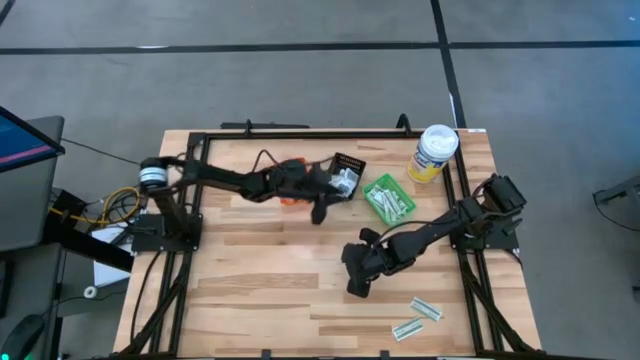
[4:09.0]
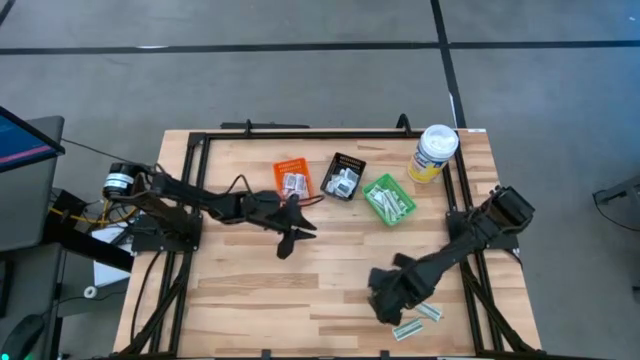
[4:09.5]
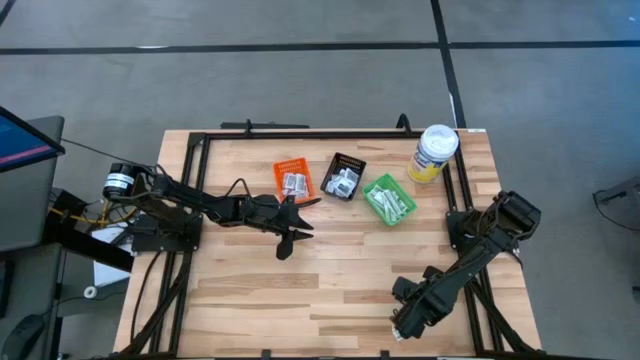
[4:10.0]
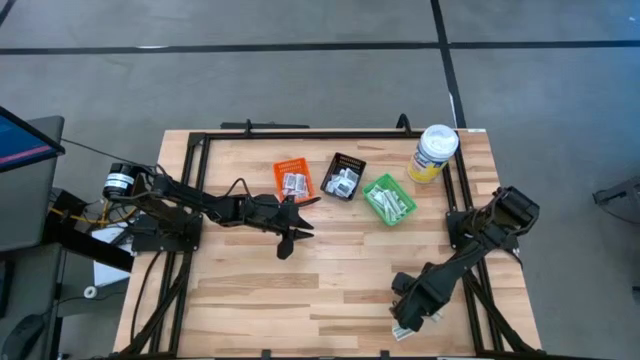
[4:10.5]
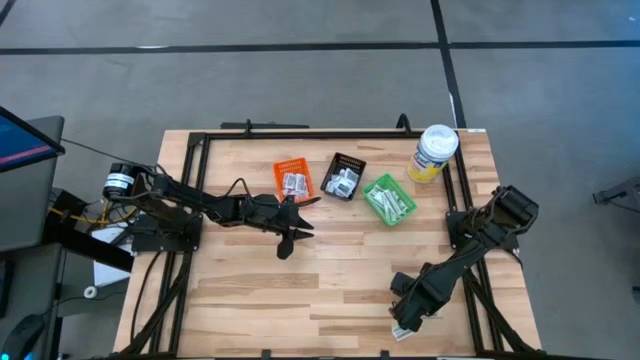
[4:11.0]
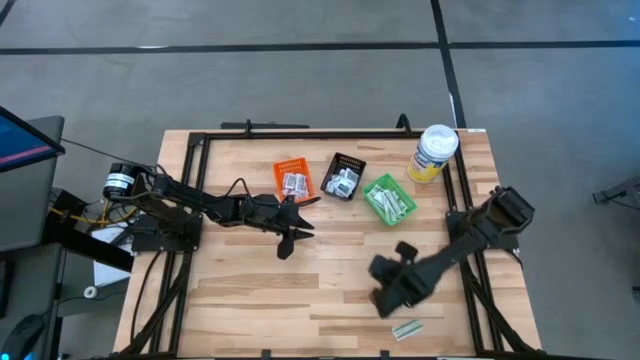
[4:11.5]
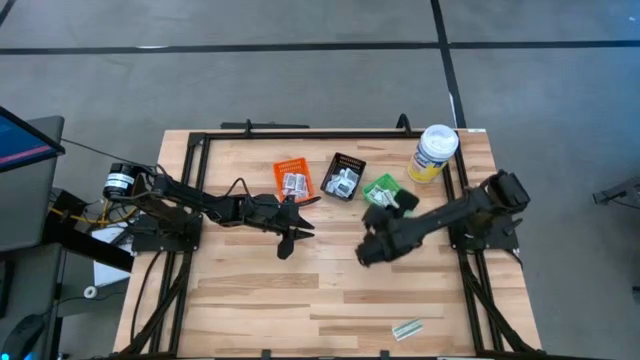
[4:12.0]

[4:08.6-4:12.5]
Task: Pick & Place First Aid Supplies
Put the green bandage pack into the green basket

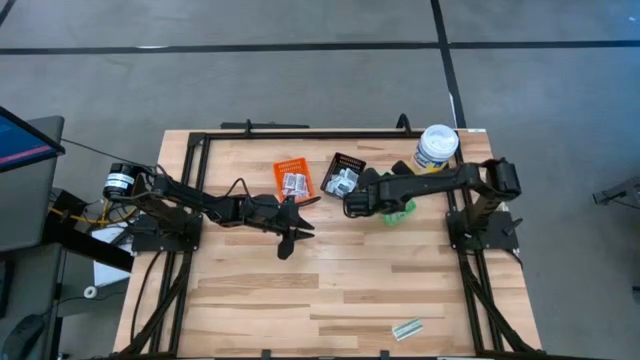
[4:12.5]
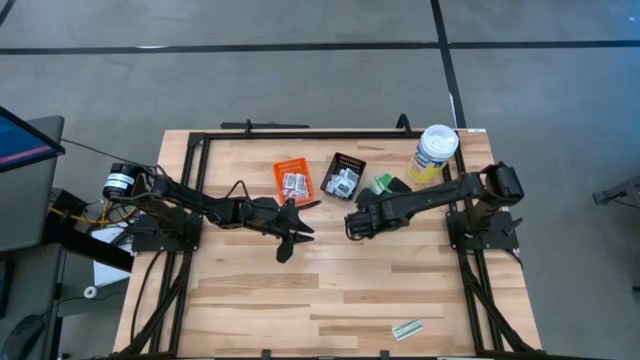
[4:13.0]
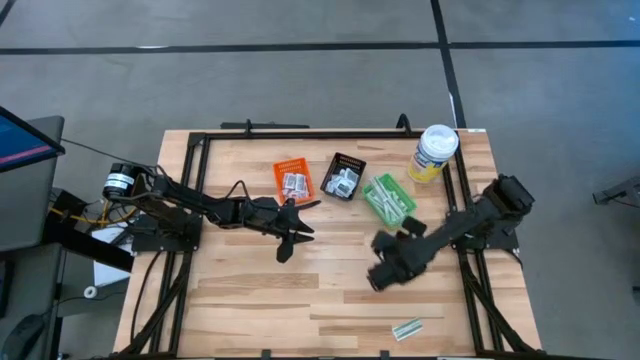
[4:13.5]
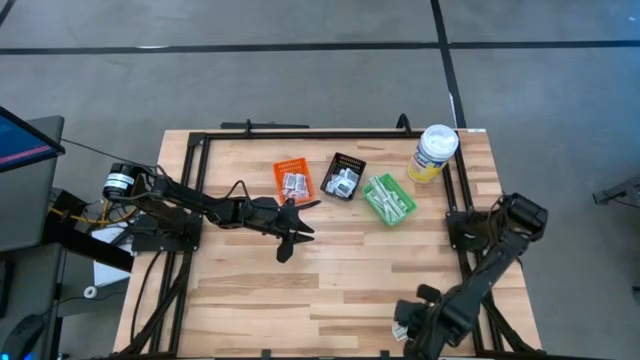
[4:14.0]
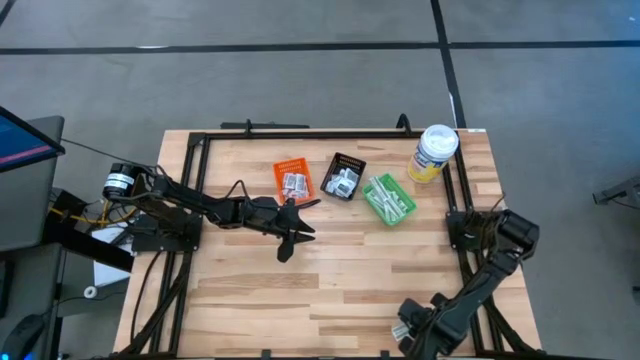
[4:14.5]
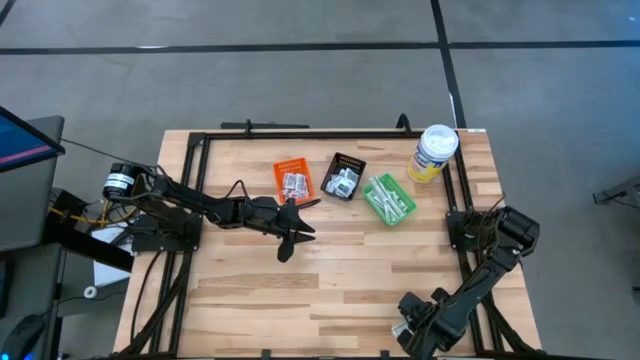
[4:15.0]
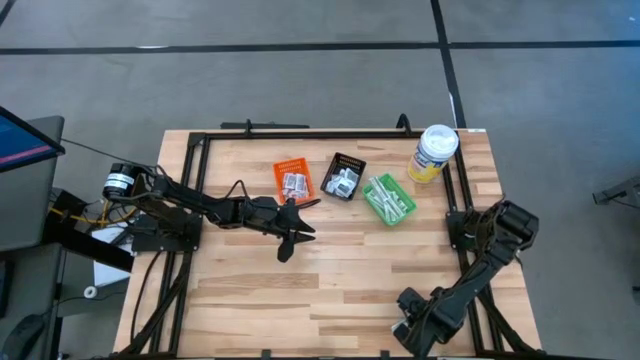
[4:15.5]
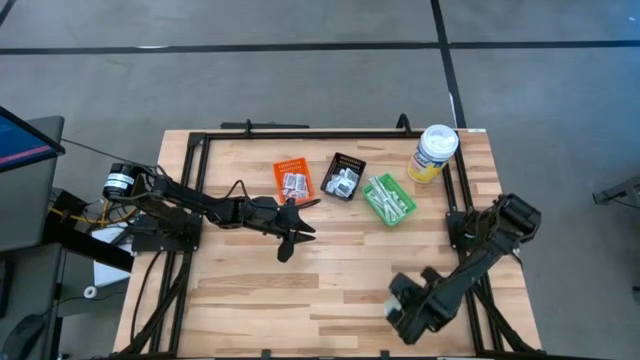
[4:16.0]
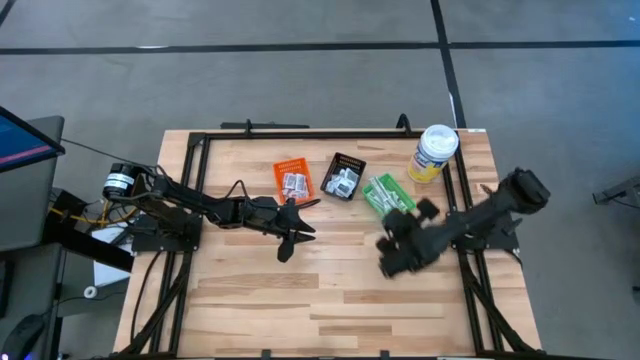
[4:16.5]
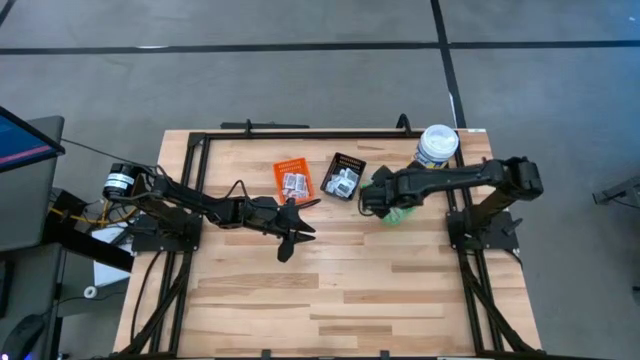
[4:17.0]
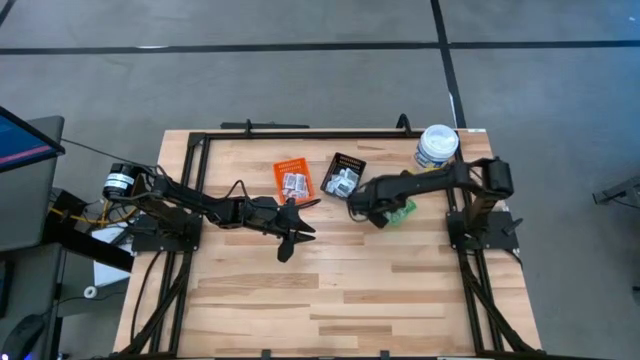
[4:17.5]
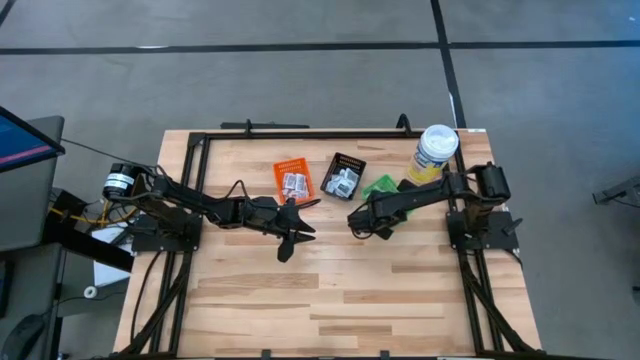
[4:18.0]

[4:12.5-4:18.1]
Put the green bandage pack into the green basket

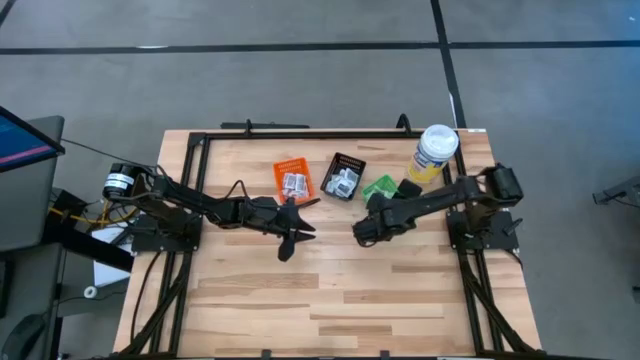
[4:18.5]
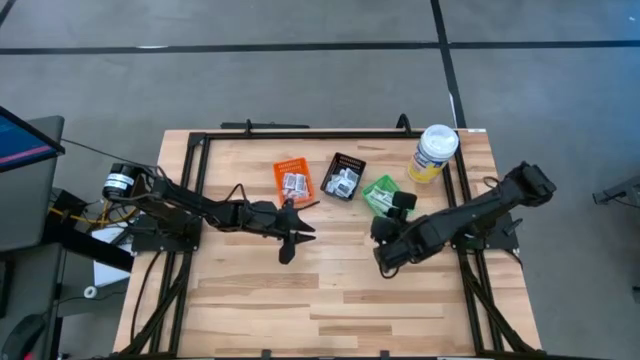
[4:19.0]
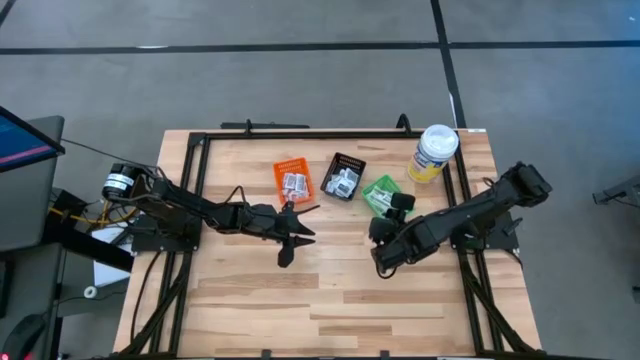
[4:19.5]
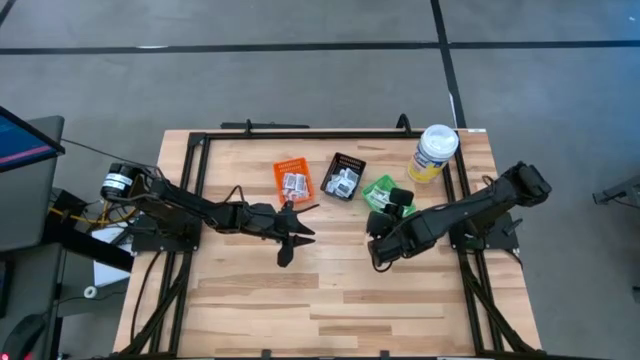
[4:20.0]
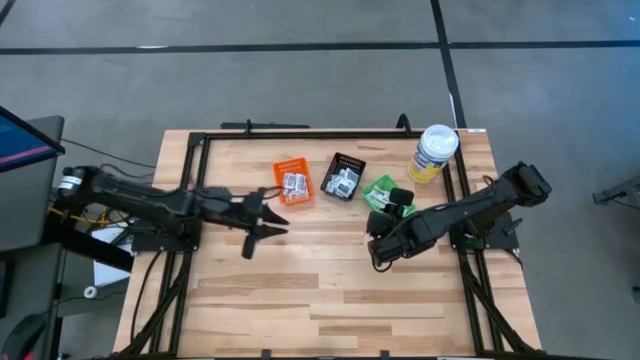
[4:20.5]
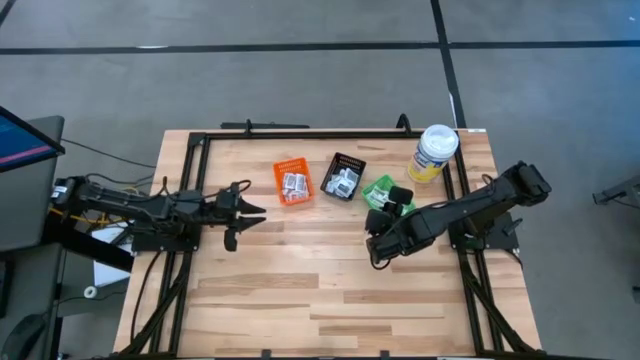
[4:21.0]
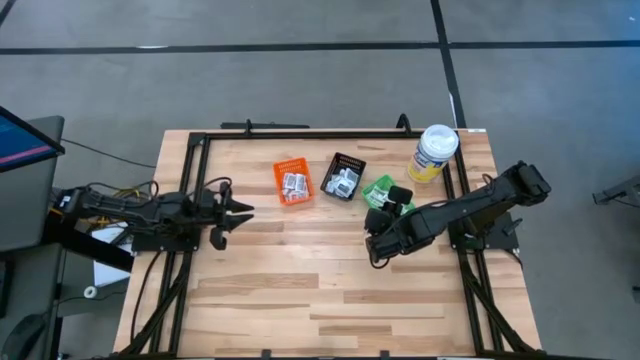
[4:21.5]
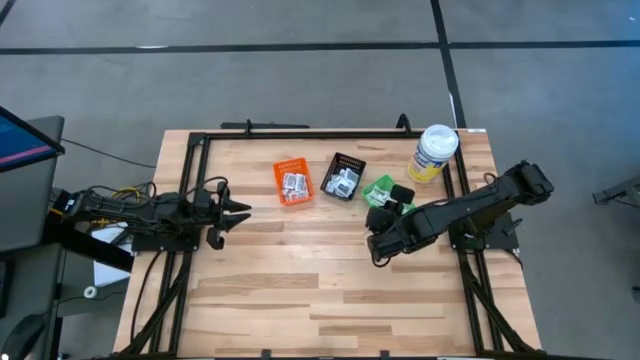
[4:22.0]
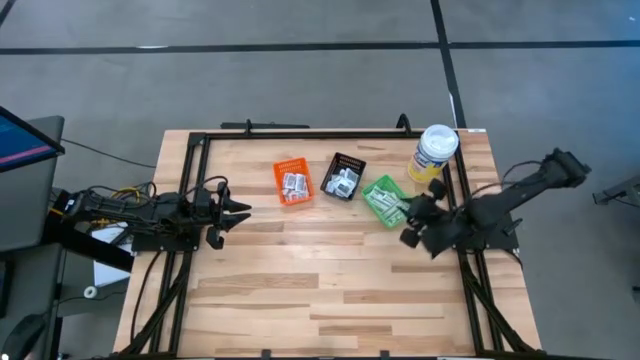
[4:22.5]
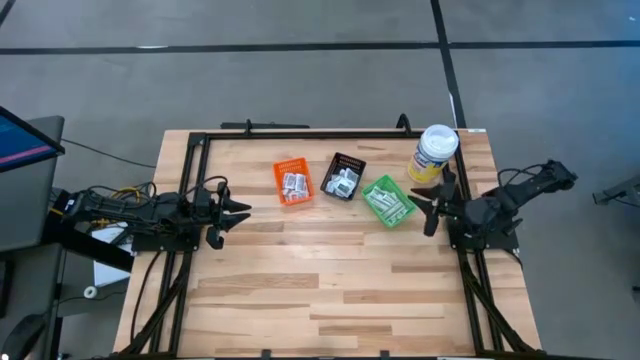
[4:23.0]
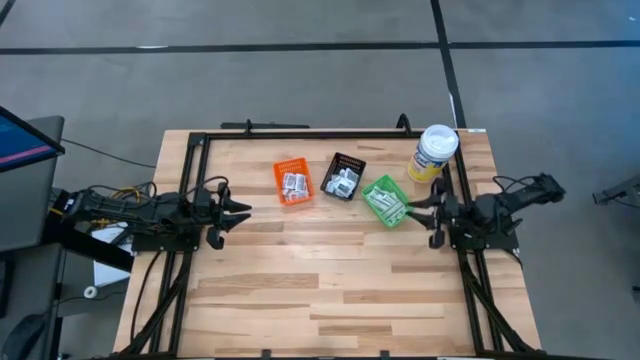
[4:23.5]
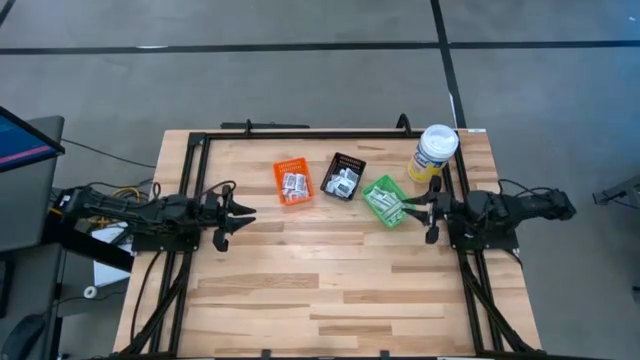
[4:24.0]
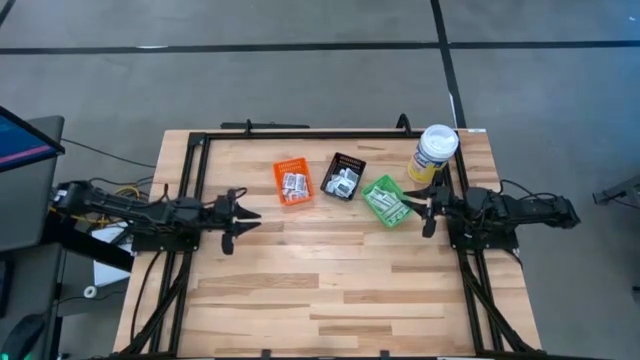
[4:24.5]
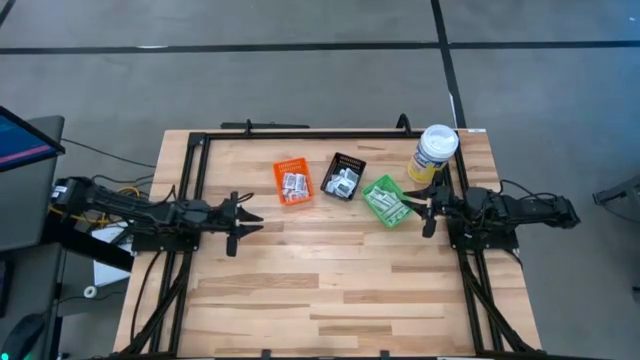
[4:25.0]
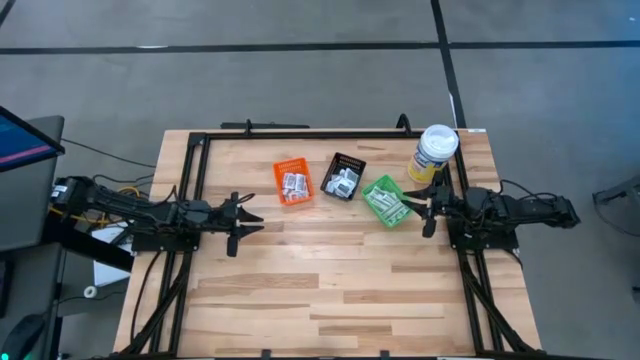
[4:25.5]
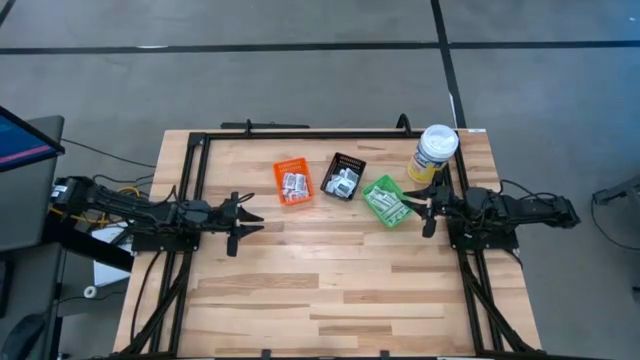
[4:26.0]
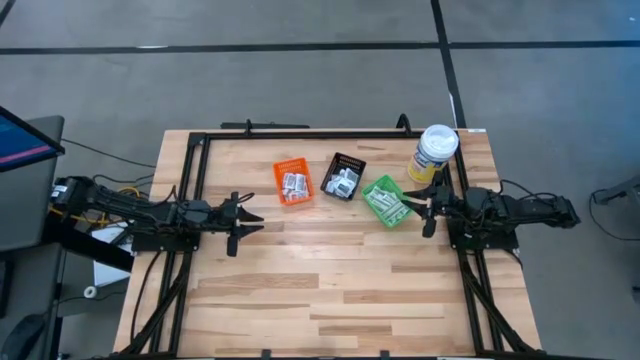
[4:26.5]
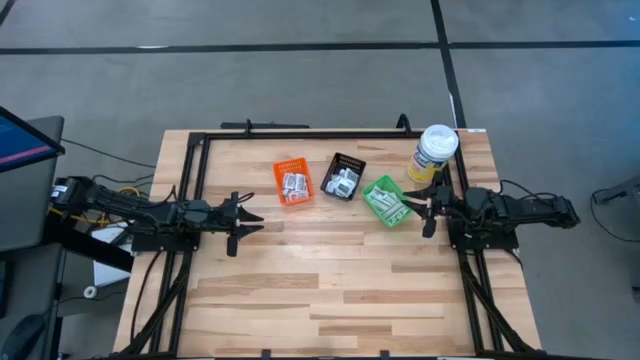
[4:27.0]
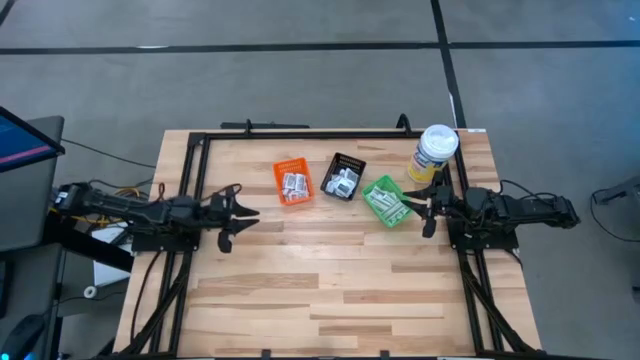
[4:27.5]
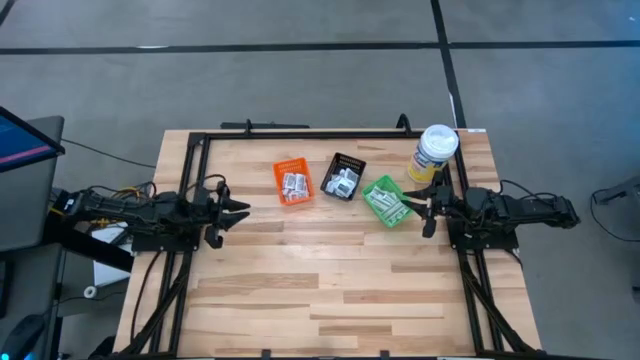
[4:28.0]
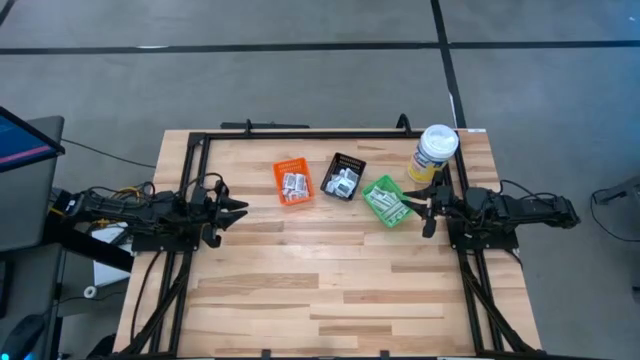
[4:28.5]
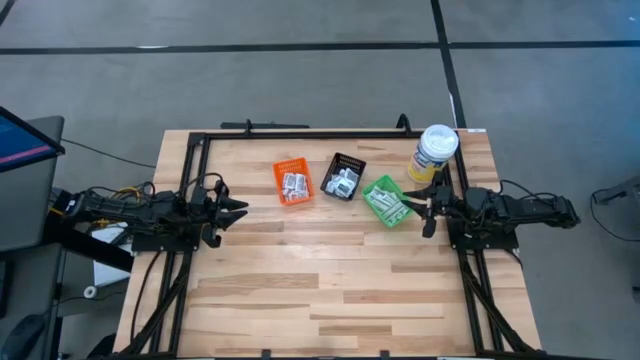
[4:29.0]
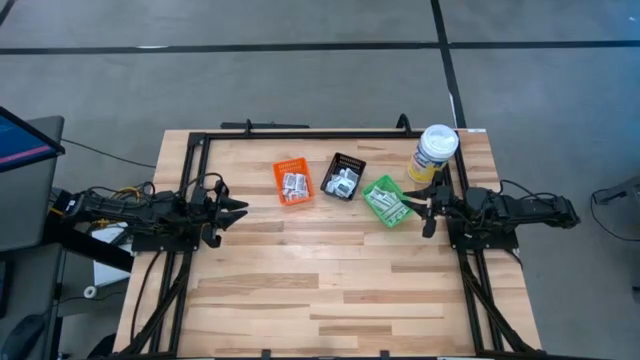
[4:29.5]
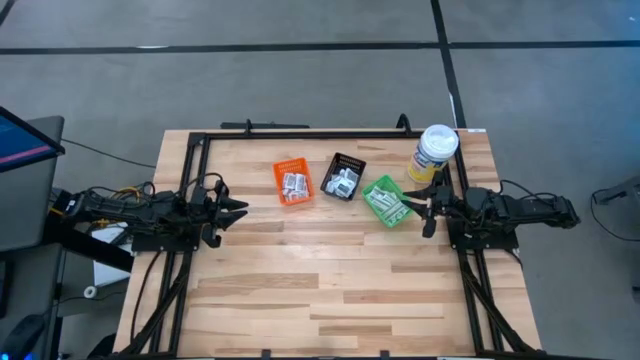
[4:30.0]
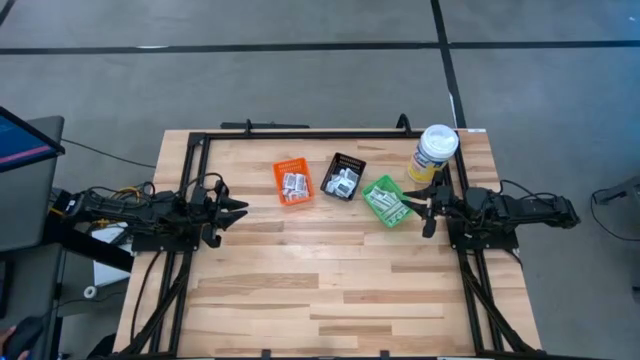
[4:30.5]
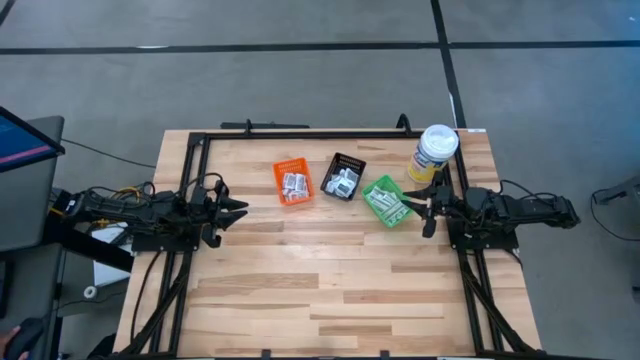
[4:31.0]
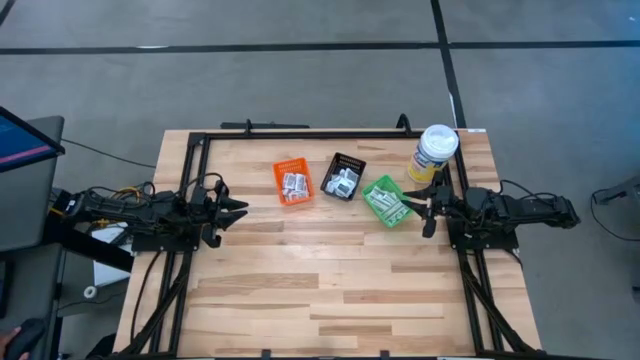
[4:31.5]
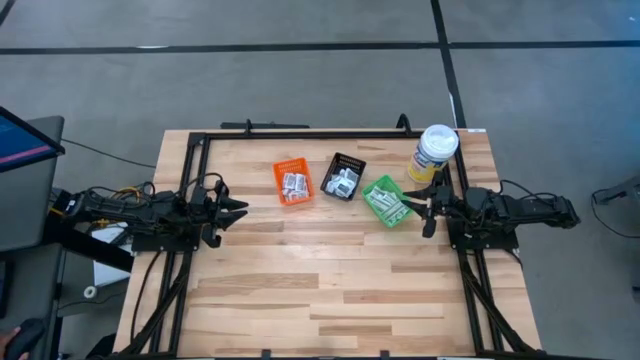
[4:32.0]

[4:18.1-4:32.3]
Return to Home Position
